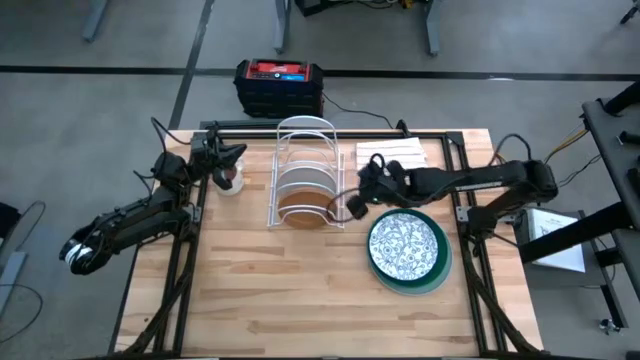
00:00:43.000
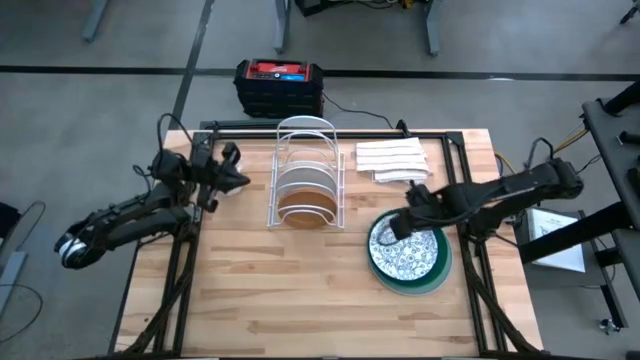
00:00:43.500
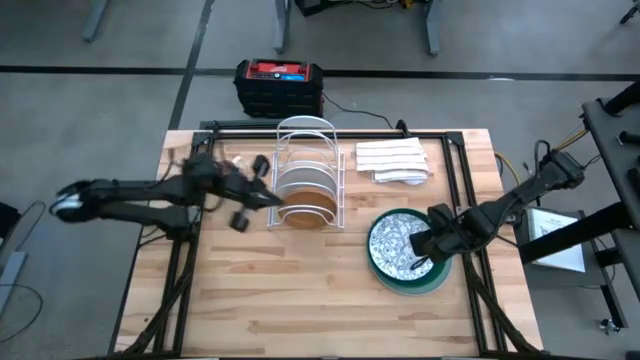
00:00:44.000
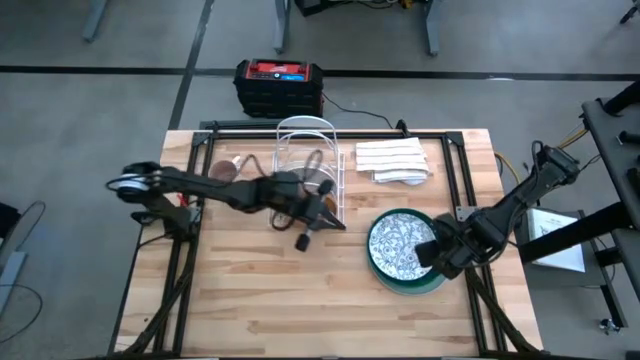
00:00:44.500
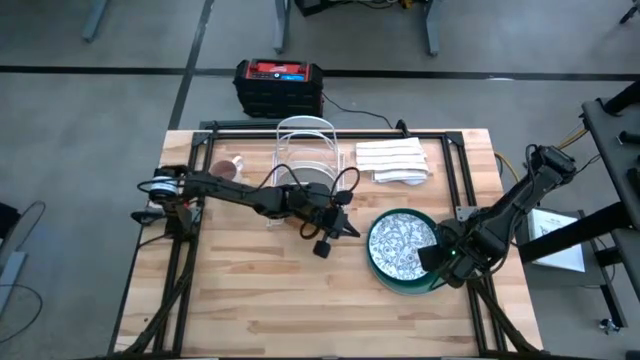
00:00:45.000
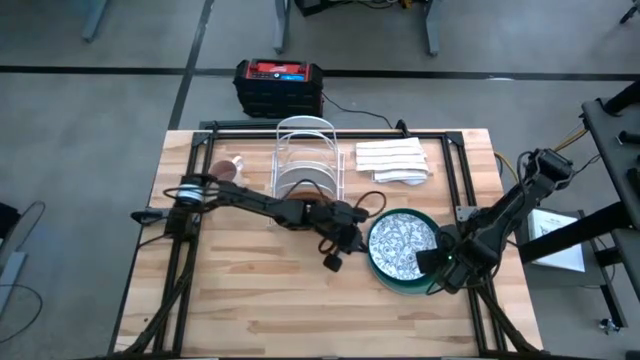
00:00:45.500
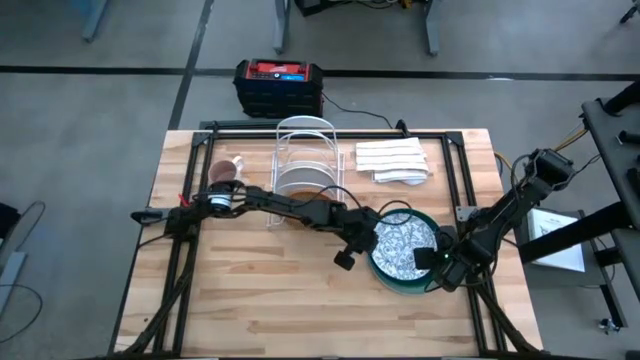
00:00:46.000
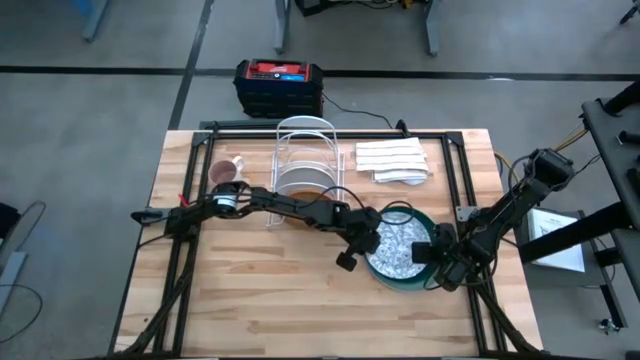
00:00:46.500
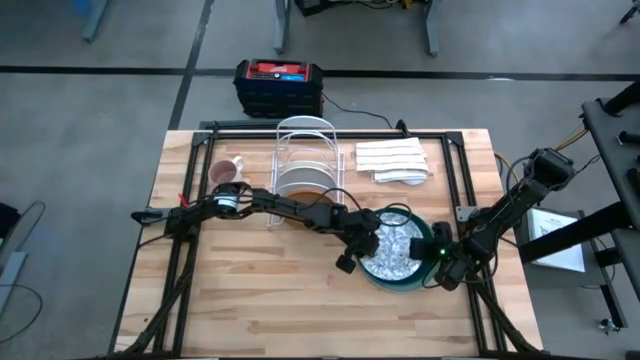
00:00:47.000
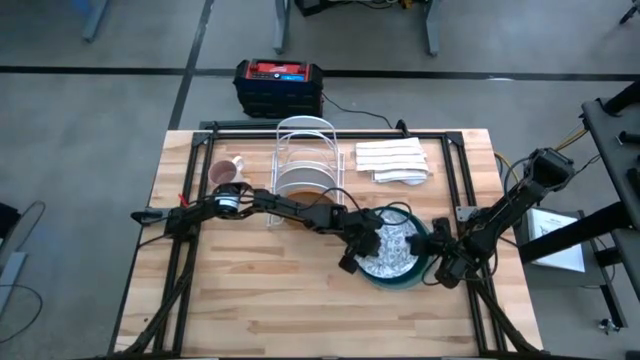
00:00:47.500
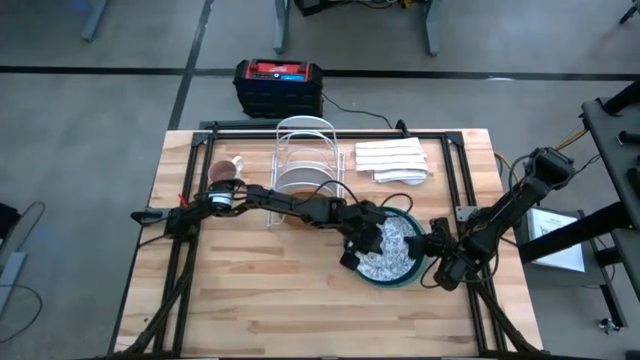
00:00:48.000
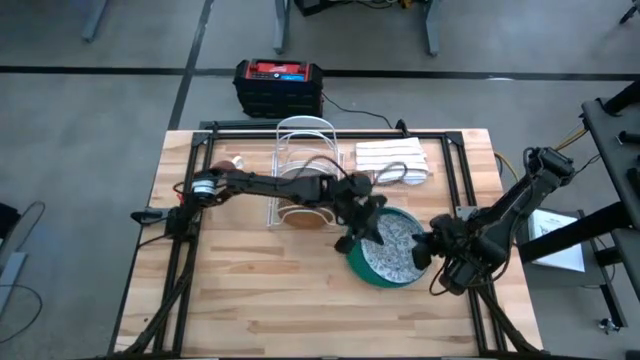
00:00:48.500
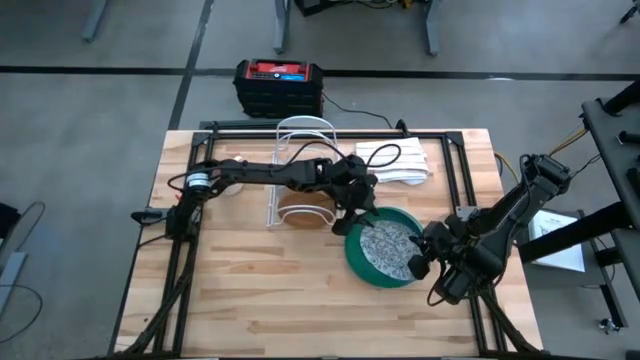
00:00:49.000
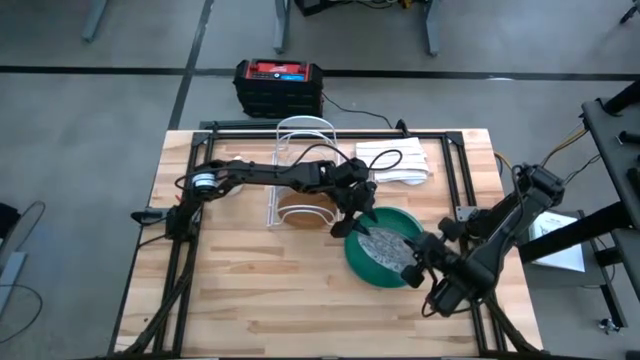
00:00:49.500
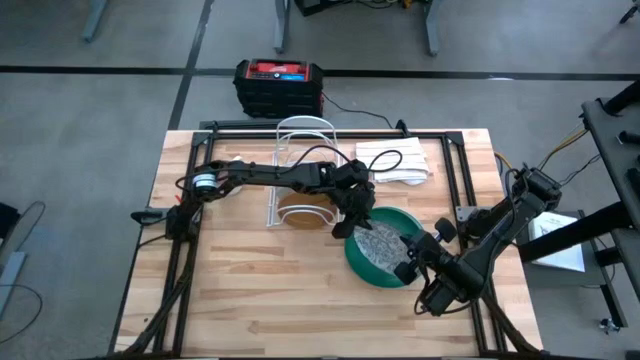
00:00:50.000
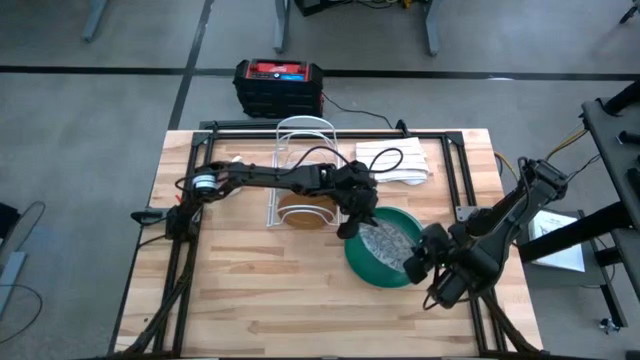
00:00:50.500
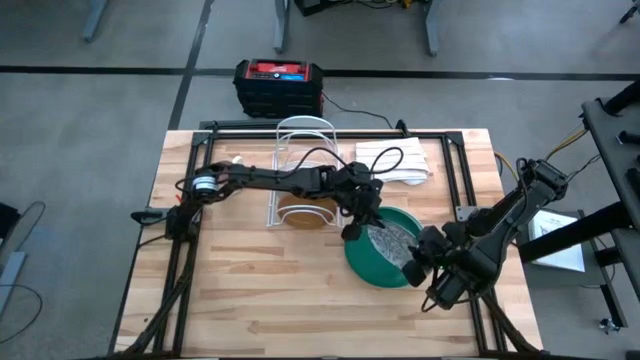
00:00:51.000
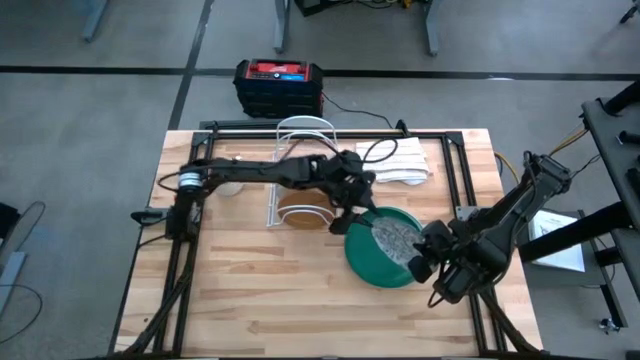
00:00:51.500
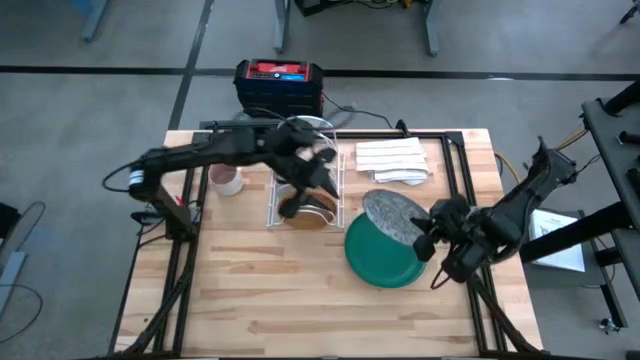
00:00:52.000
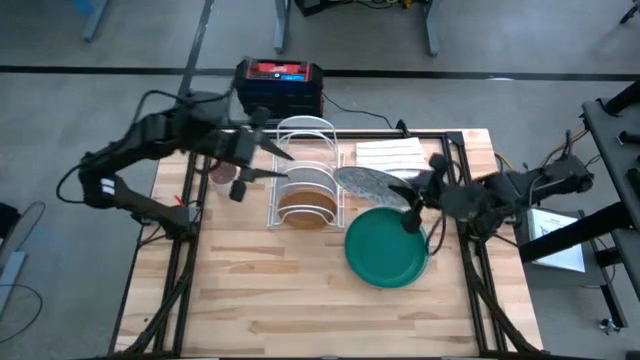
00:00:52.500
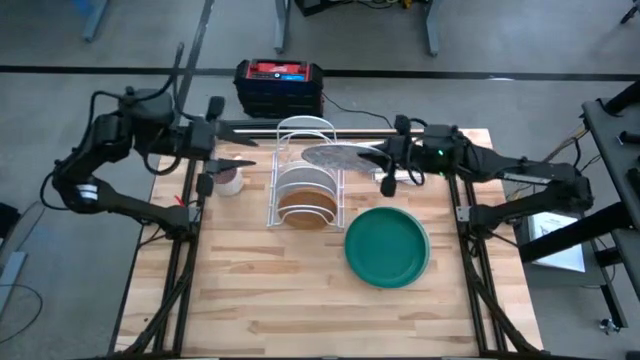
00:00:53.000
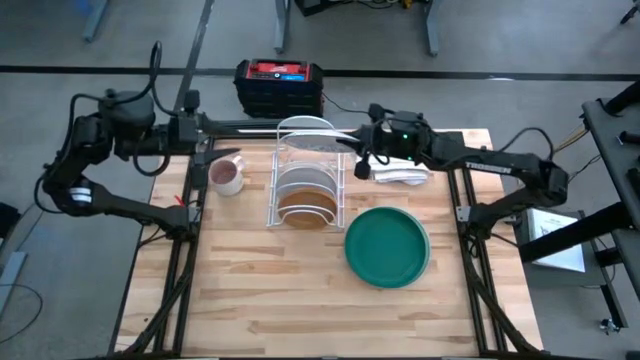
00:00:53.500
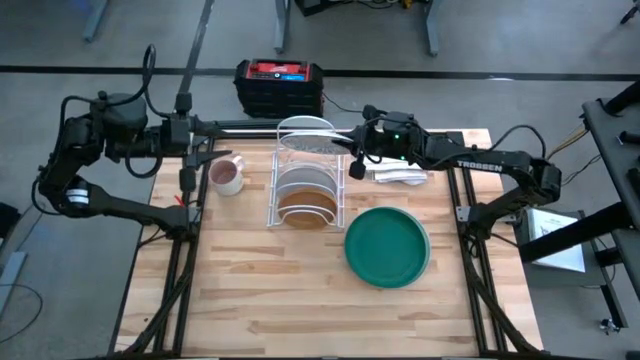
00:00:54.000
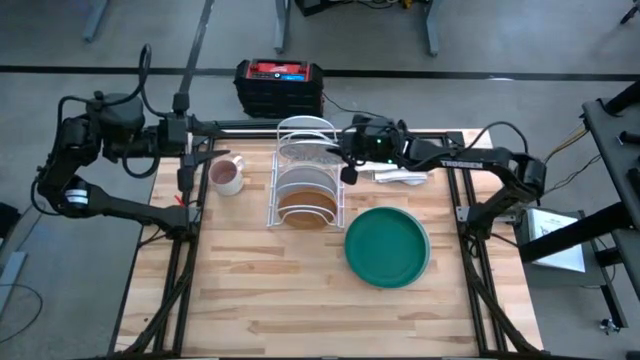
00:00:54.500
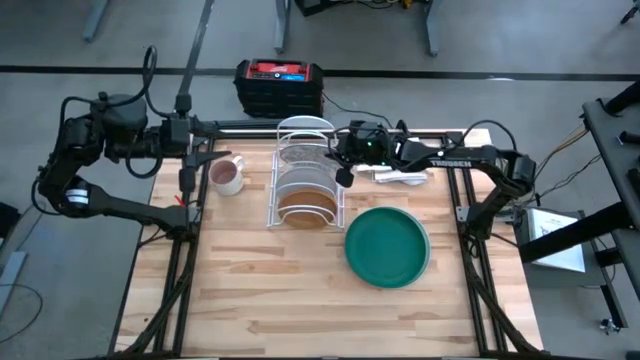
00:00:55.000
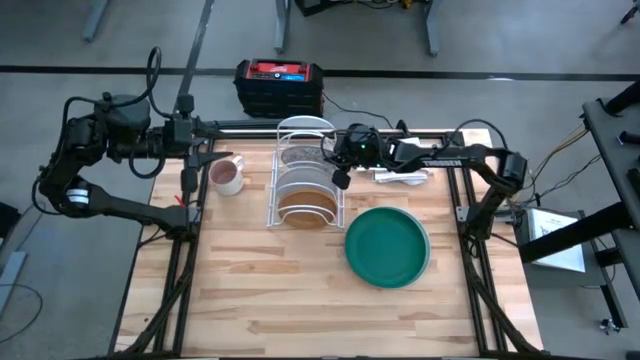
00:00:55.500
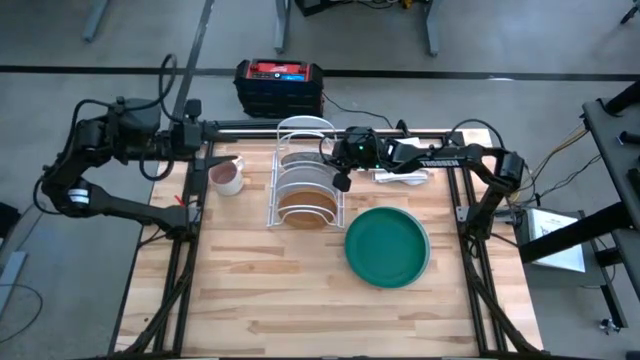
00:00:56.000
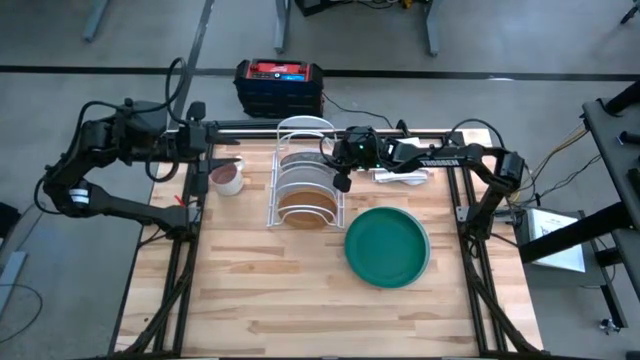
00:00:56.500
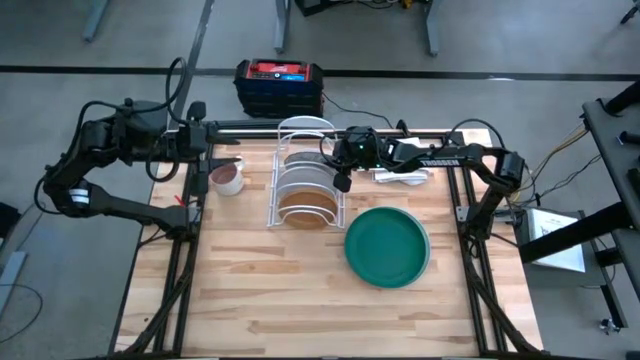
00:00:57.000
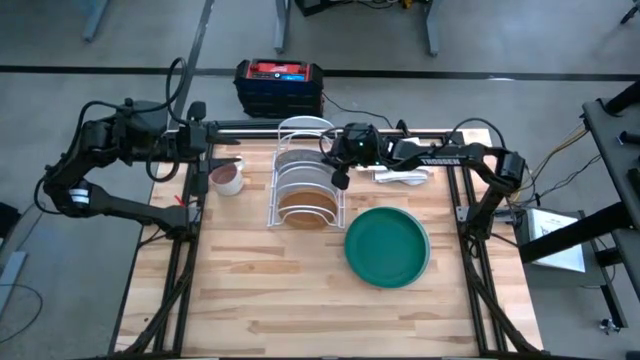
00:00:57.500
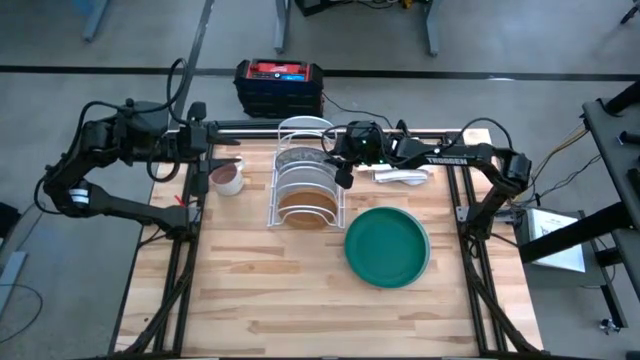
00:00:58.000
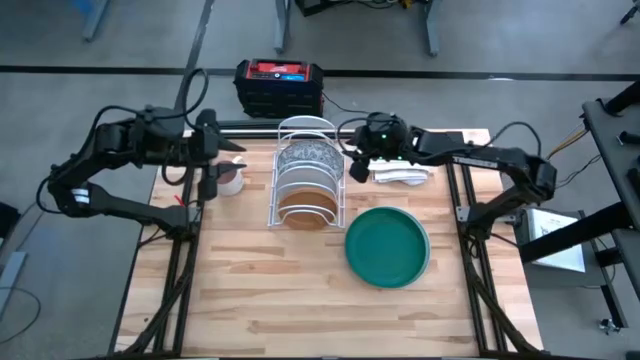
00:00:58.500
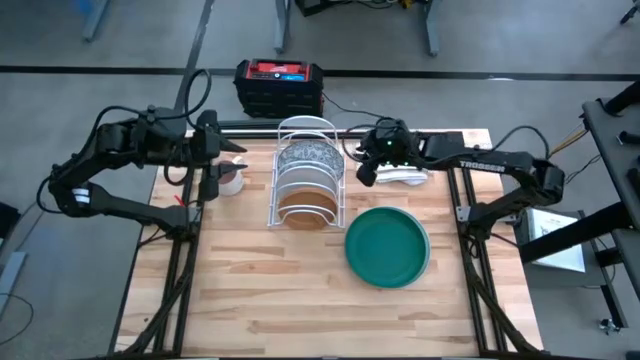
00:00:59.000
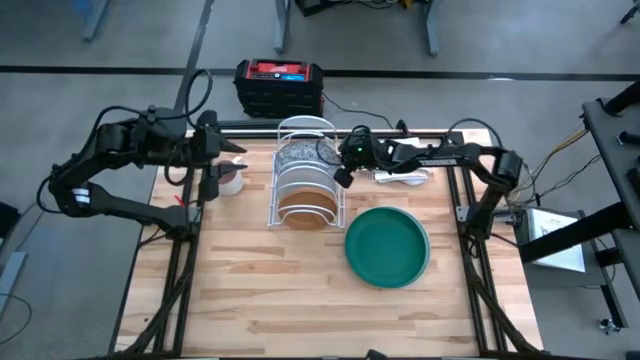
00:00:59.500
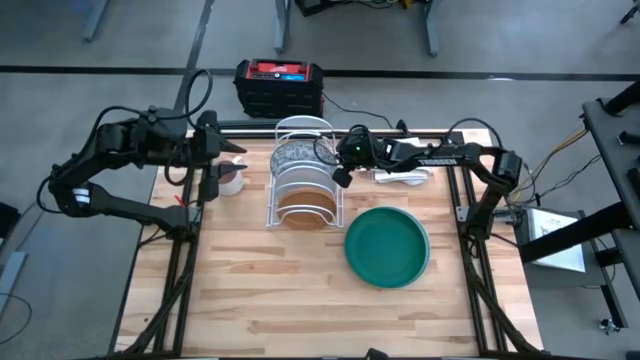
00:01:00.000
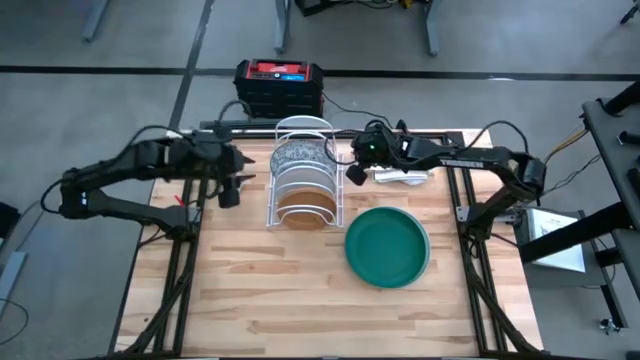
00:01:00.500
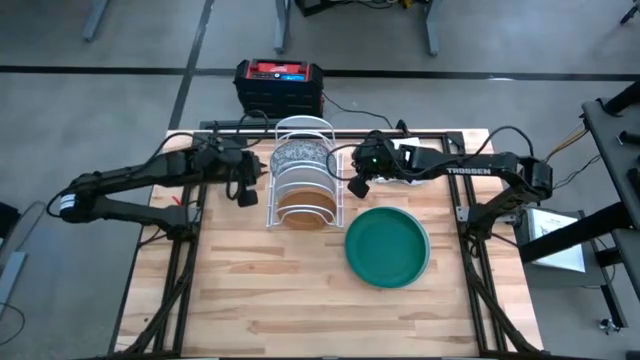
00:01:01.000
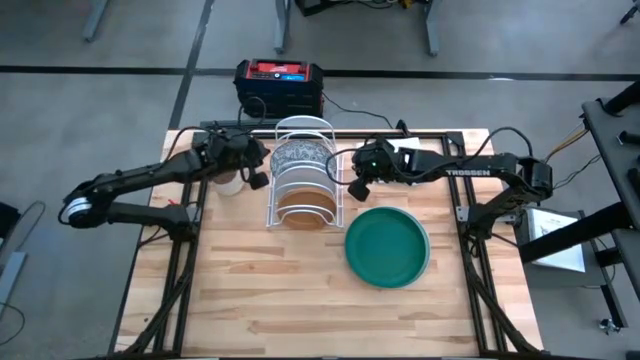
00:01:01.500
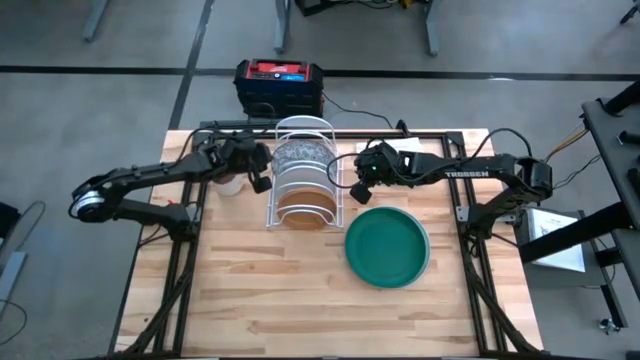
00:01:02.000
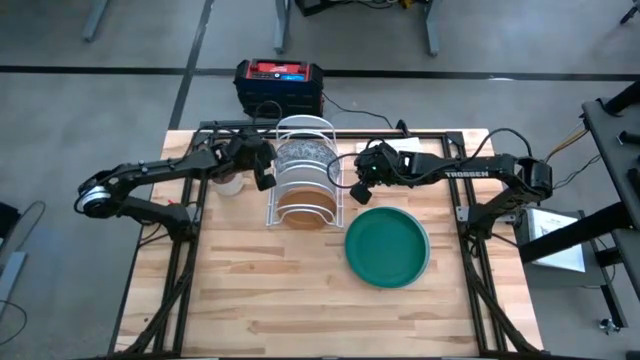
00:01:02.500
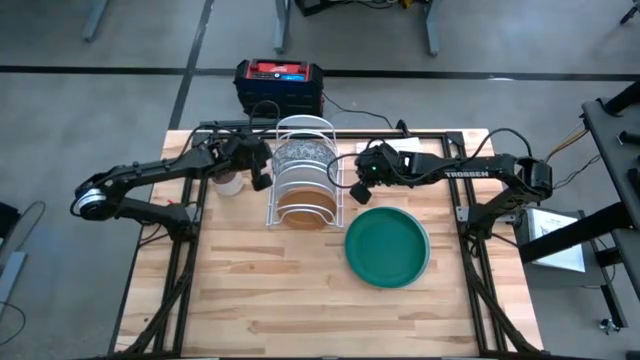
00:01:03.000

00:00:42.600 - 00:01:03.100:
Task: Sort dishes
Put the blue patterned plate in the dish rack

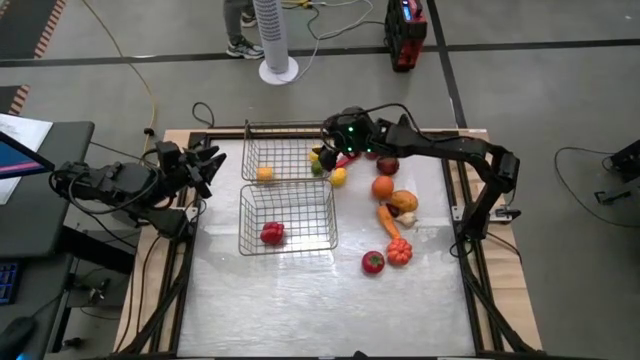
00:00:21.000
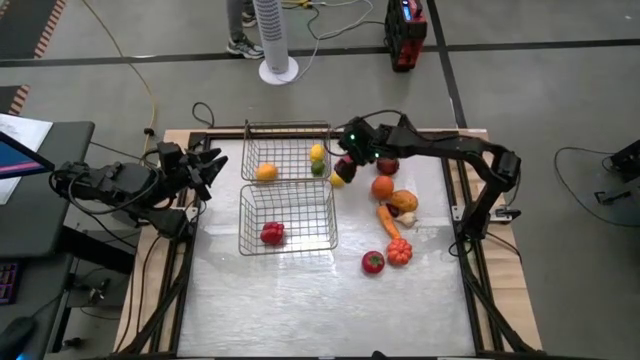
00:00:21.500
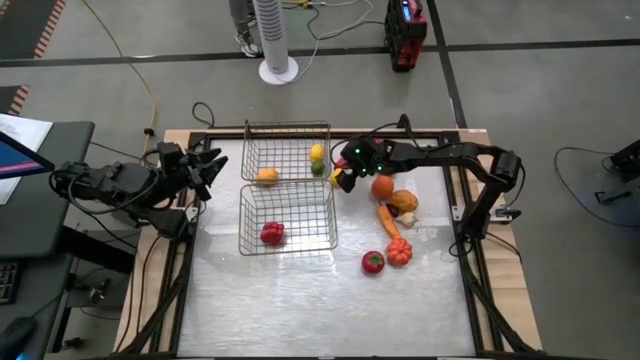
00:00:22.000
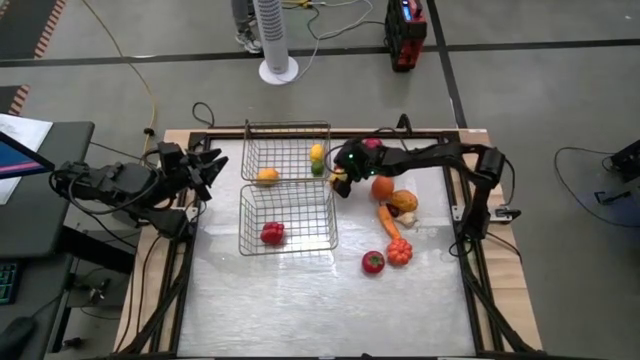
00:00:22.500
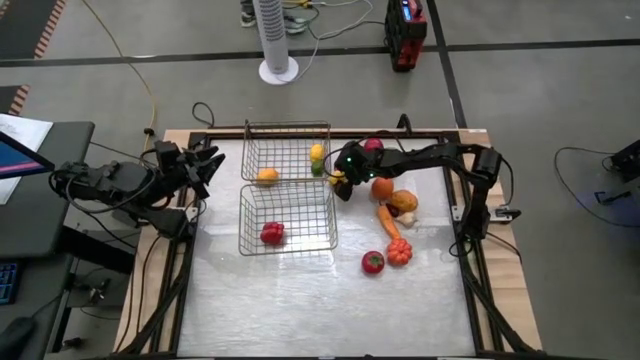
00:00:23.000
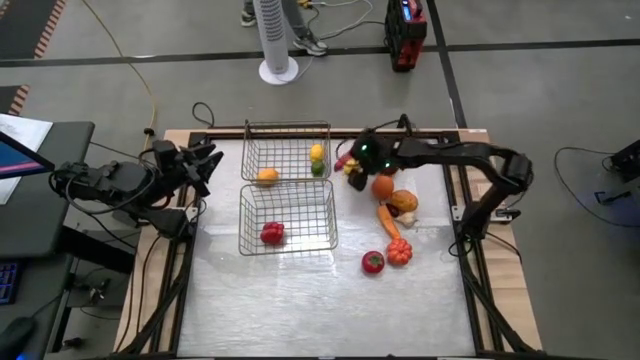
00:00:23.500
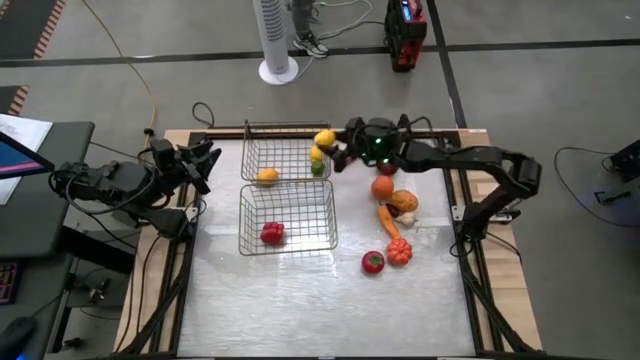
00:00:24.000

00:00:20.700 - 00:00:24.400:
Task: Sort produce into baskets
Put the yellow lemon into the top mesh basket
